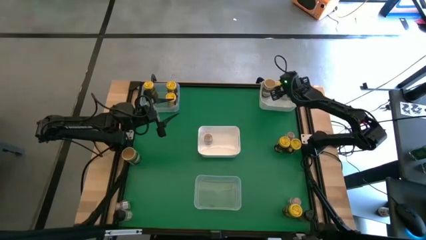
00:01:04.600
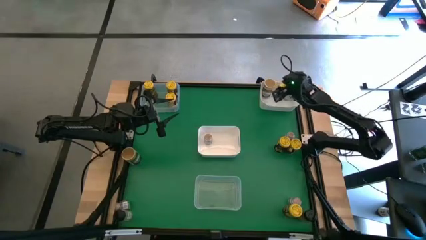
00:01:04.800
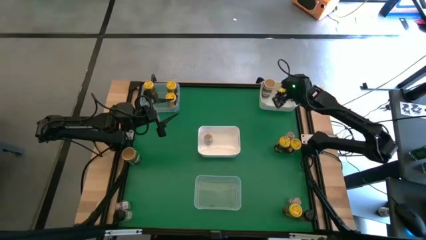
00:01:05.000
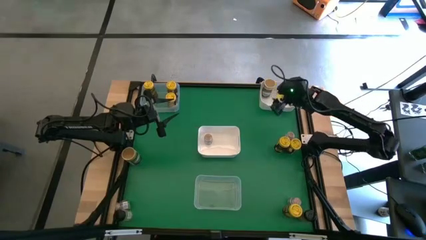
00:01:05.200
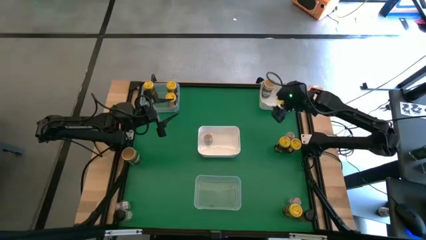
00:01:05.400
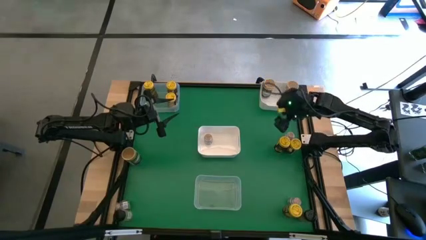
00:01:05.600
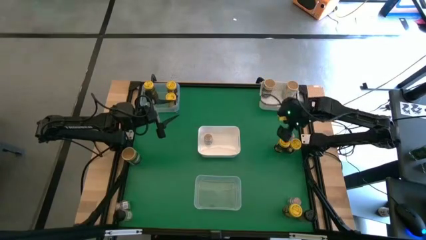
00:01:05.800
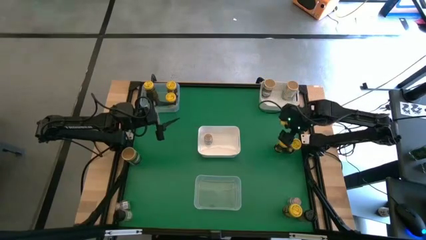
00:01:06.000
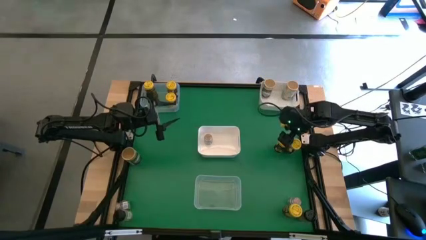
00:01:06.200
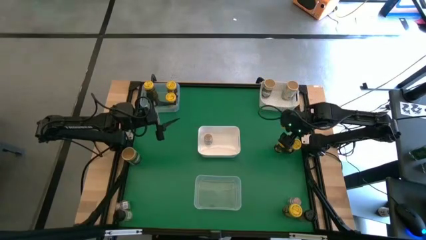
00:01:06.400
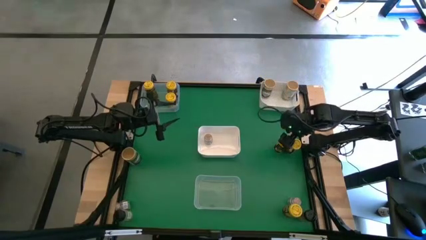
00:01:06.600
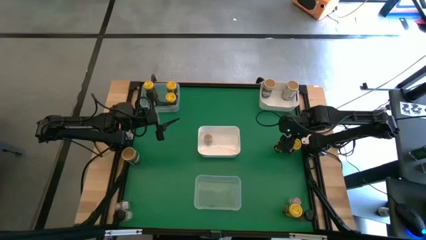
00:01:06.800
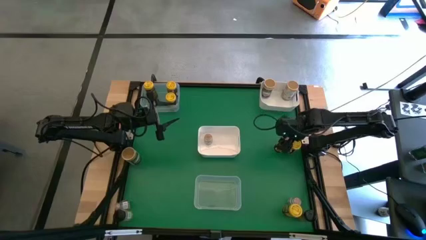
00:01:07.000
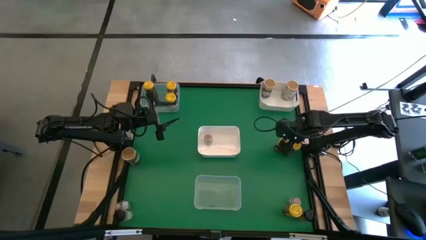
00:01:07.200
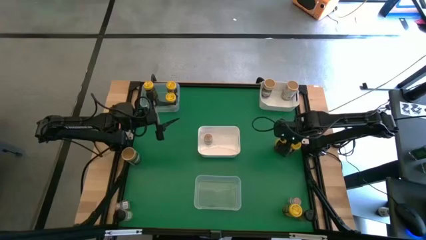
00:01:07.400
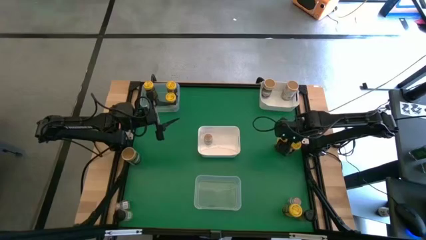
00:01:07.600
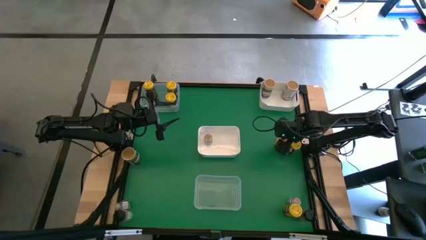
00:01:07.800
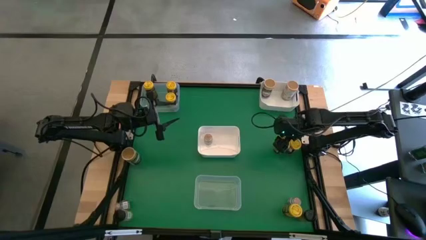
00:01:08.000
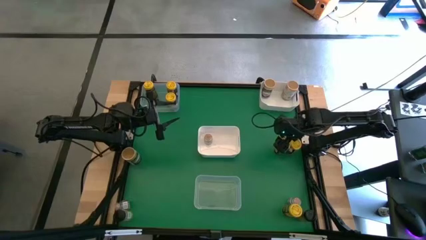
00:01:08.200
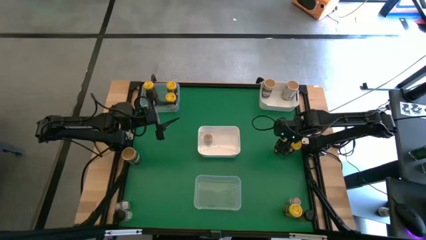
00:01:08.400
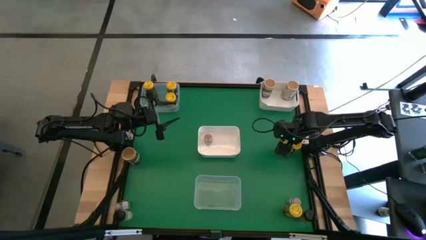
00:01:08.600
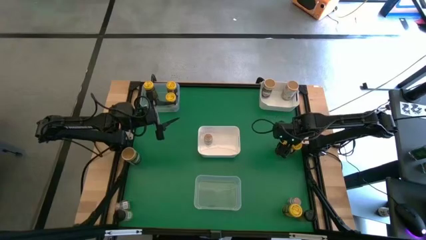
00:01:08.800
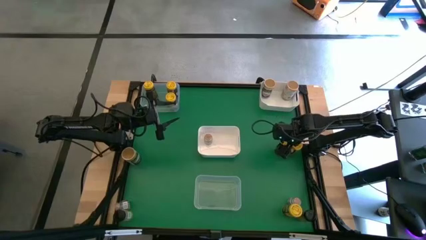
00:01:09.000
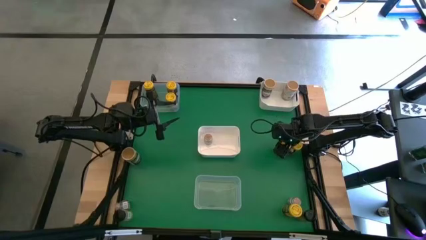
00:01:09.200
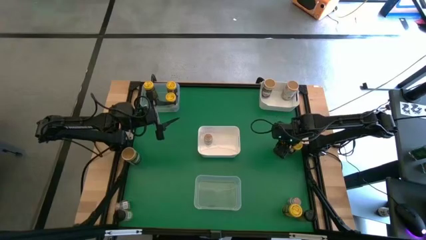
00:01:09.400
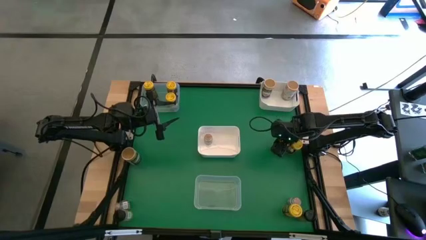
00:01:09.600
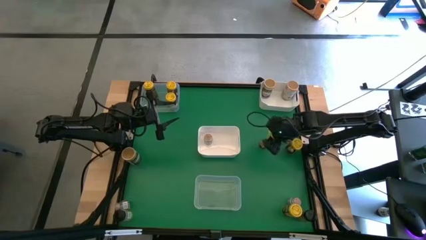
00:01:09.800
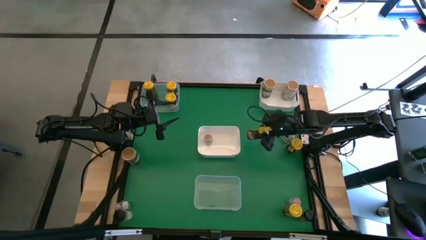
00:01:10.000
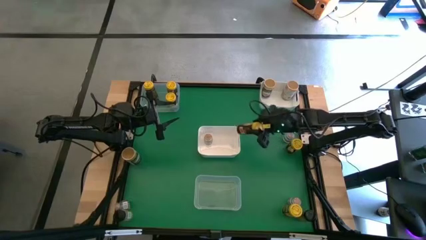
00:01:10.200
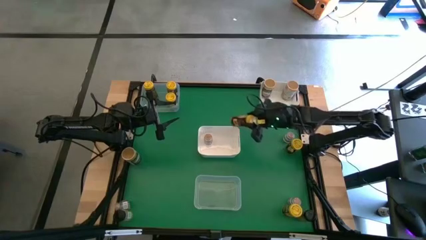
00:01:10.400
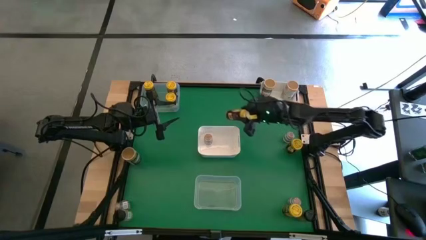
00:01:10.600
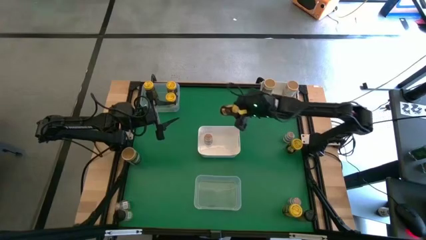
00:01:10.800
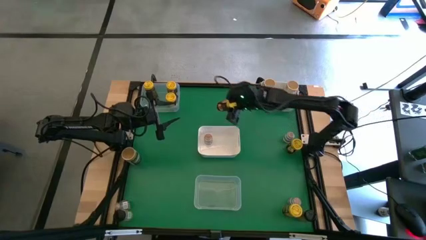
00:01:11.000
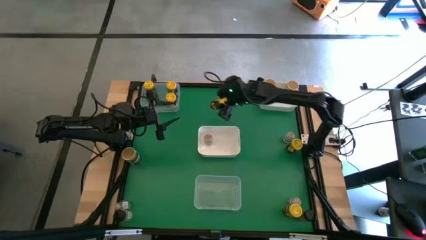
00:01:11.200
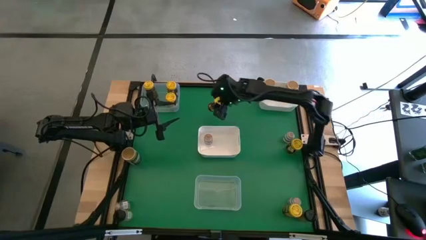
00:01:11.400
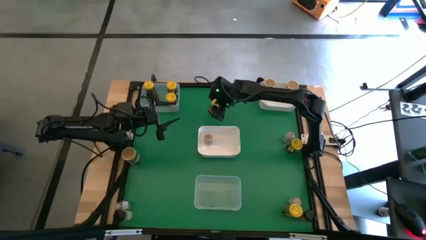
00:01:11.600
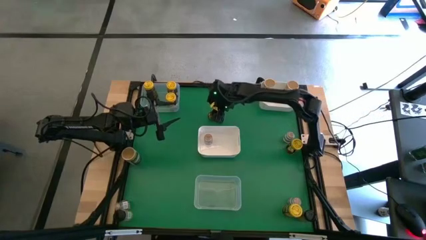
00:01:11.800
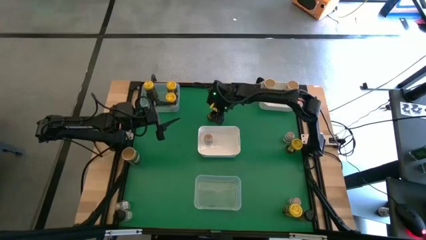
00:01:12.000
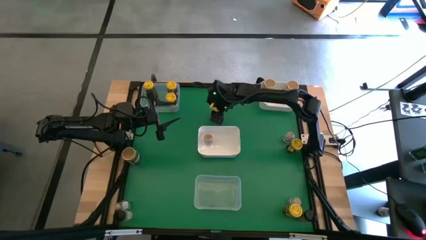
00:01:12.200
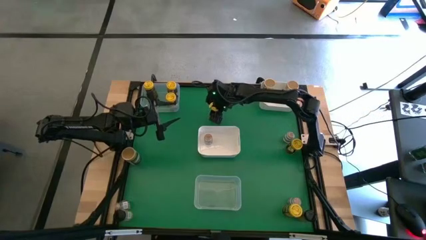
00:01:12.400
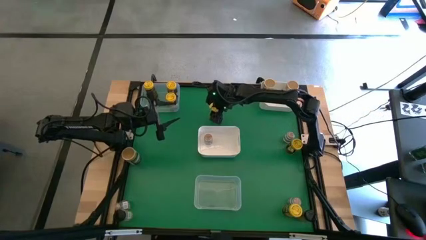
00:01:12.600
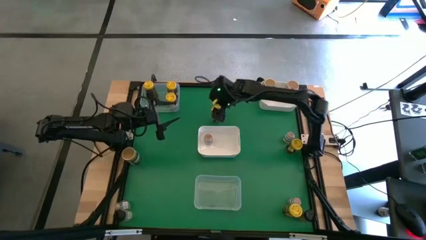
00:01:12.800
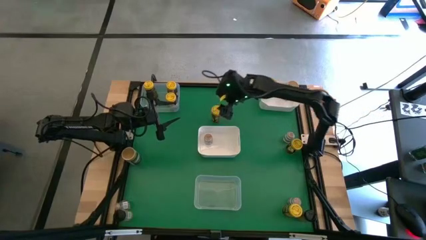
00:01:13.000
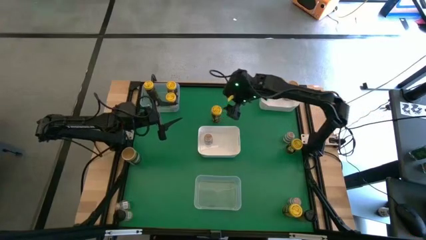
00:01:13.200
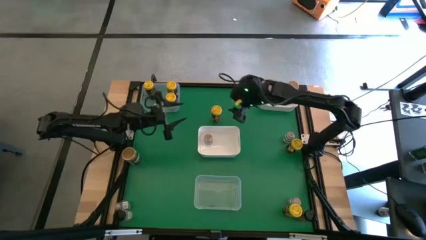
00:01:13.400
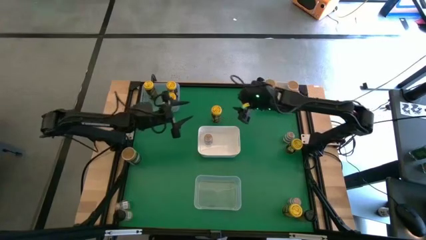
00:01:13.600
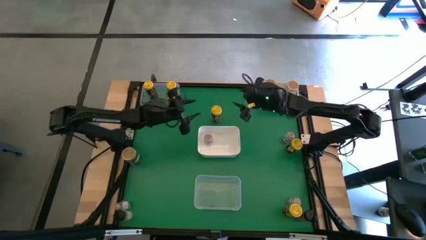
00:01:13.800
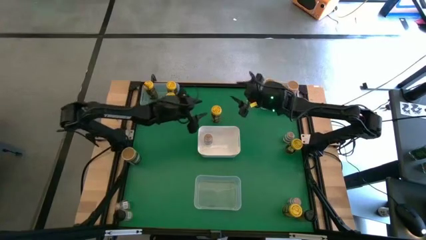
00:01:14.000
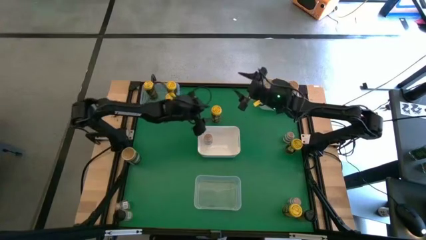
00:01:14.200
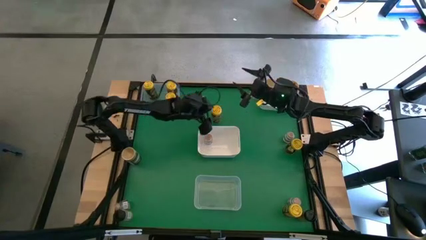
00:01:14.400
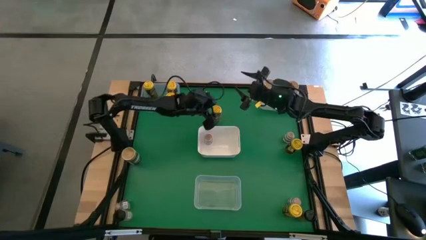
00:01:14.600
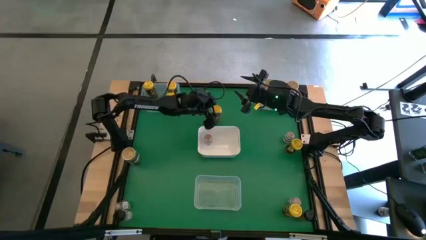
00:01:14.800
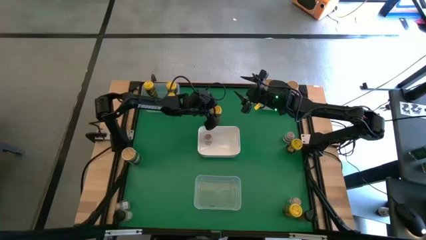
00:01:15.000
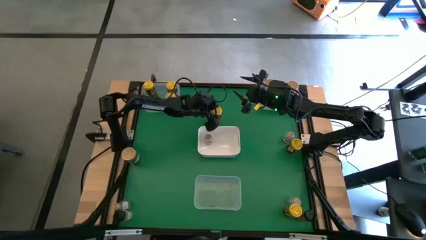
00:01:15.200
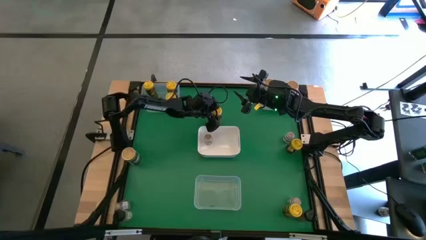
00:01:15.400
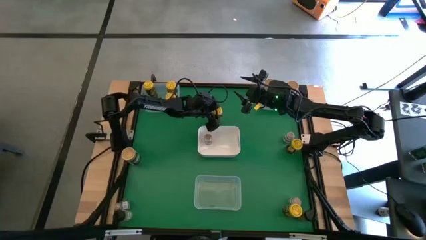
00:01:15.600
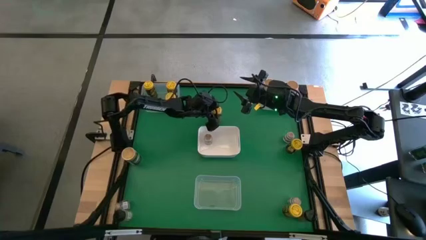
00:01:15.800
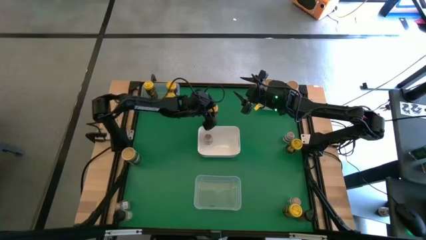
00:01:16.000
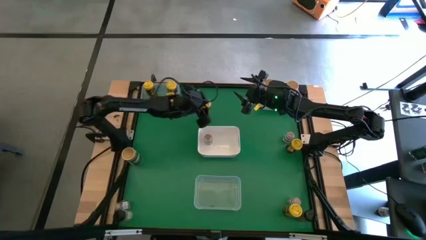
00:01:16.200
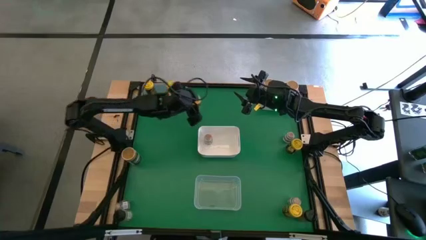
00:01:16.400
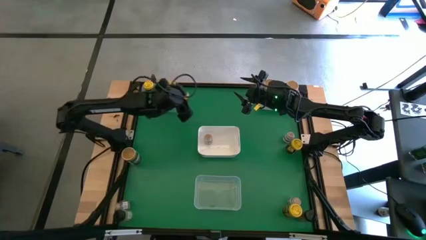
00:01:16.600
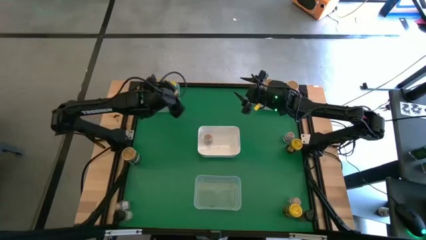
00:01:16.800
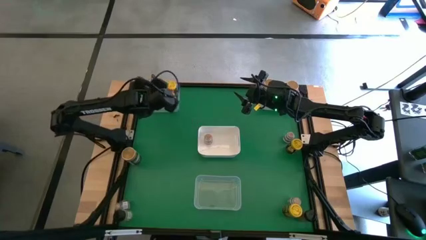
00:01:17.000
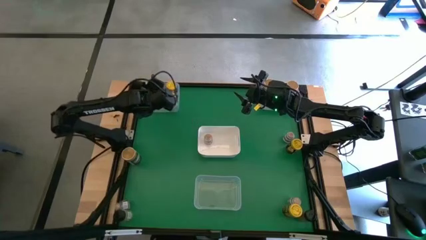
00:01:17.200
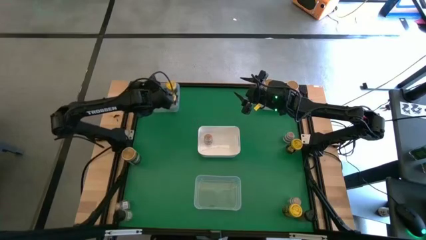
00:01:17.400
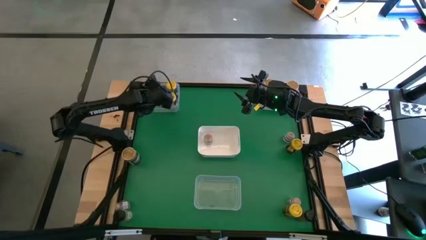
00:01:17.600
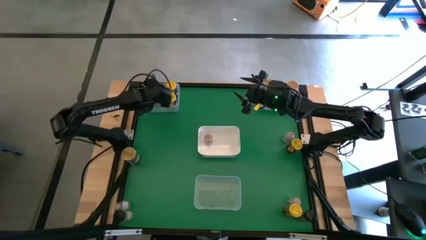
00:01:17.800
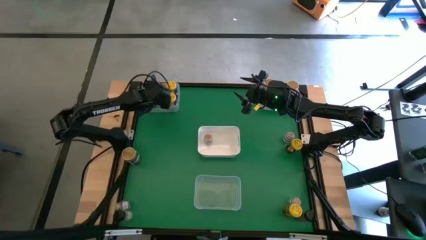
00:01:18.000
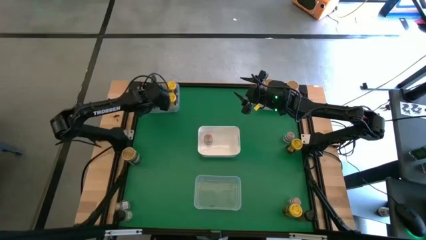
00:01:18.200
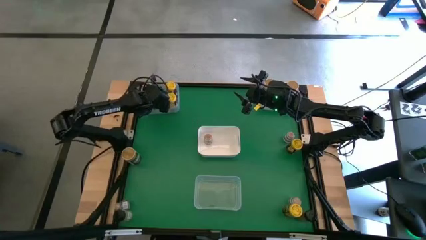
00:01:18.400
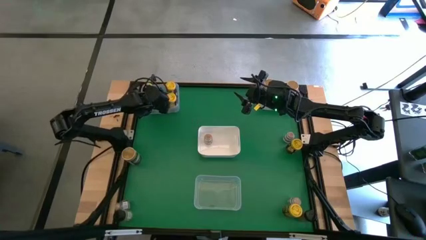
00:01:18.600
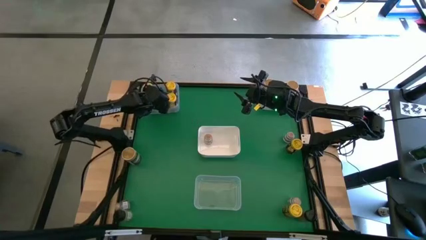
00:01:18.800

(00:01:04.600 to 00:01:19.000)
Task: Sort spices by type
Put the middle left yellow seasoning bottle into the top transparent bin
